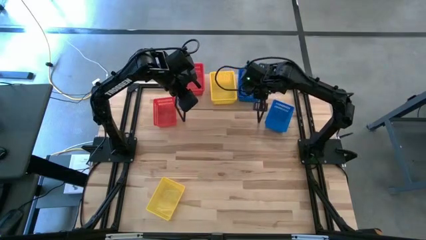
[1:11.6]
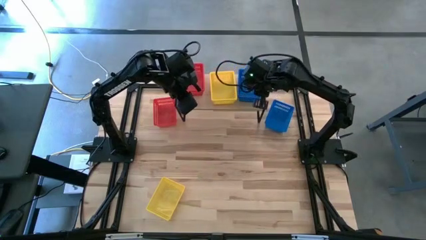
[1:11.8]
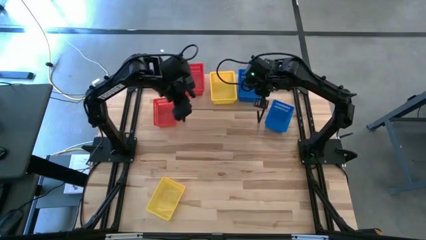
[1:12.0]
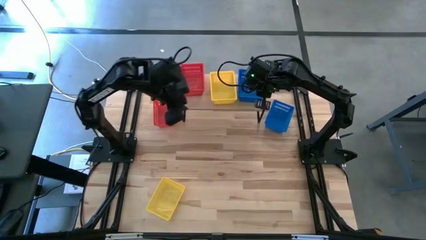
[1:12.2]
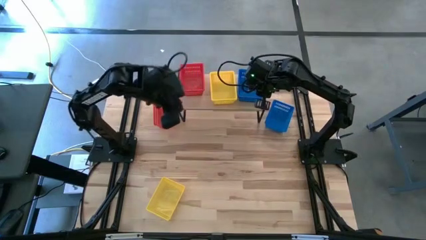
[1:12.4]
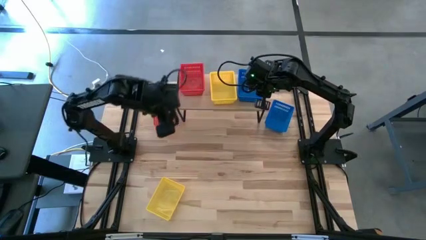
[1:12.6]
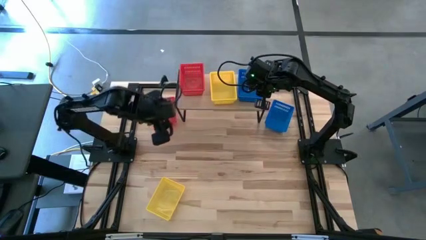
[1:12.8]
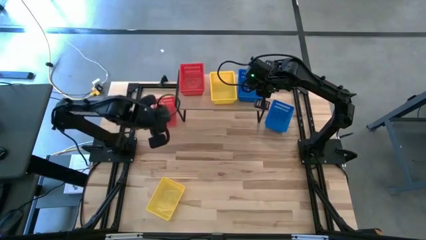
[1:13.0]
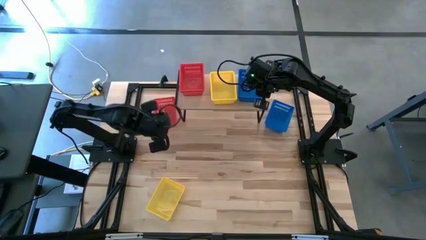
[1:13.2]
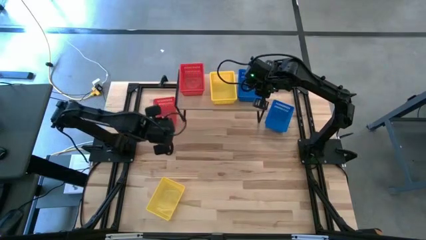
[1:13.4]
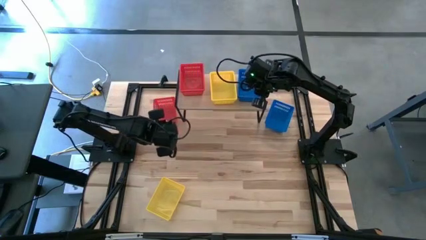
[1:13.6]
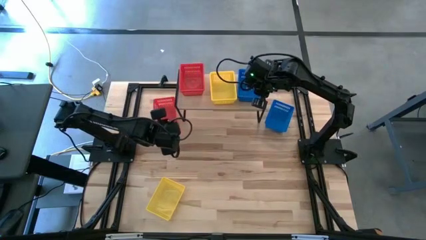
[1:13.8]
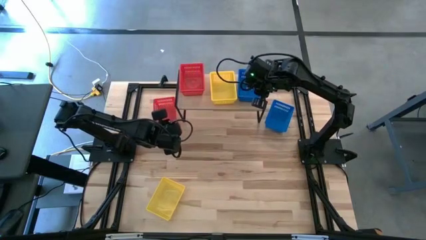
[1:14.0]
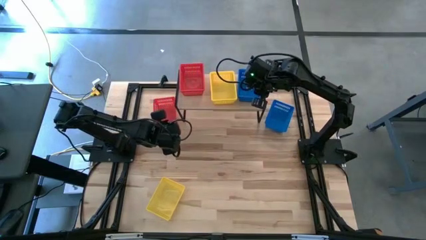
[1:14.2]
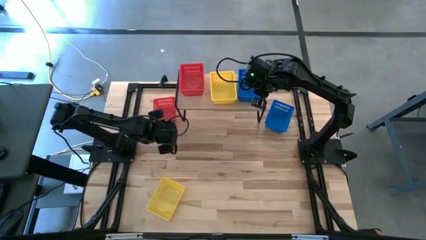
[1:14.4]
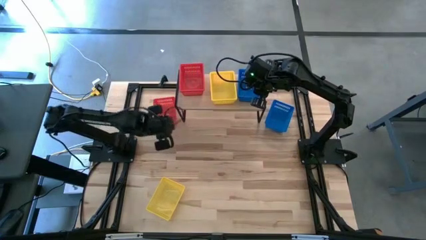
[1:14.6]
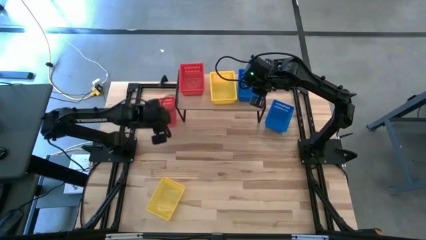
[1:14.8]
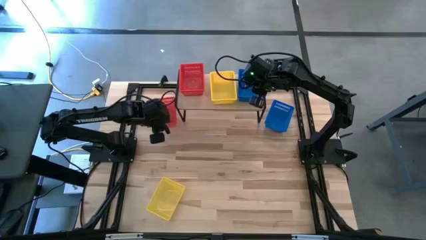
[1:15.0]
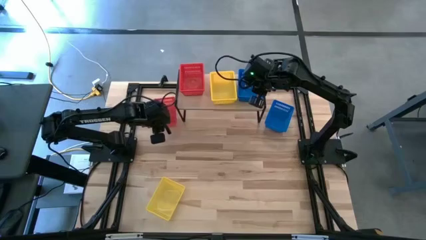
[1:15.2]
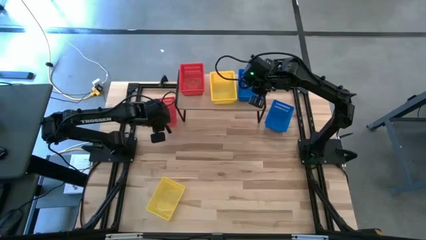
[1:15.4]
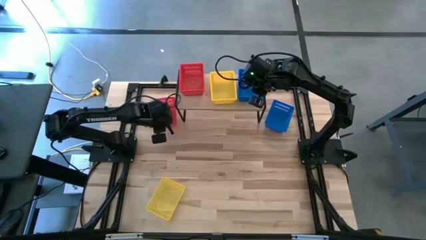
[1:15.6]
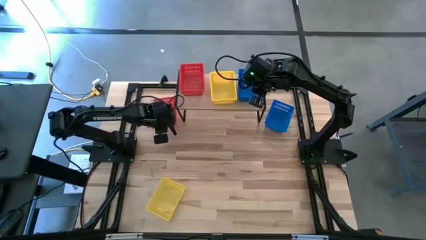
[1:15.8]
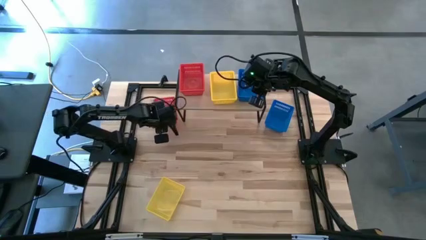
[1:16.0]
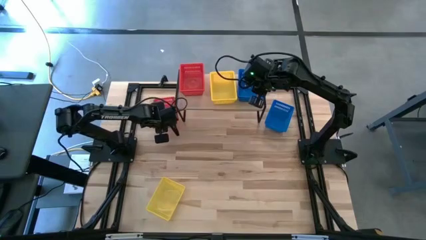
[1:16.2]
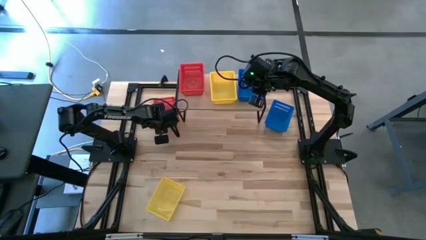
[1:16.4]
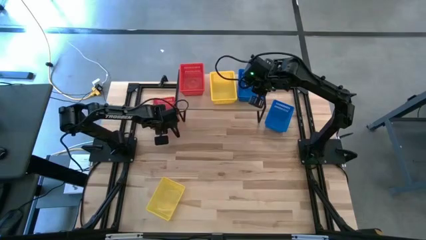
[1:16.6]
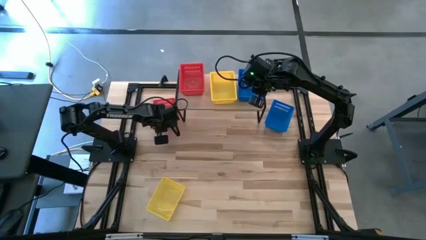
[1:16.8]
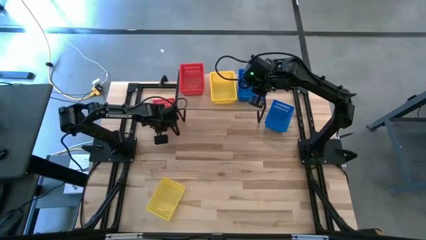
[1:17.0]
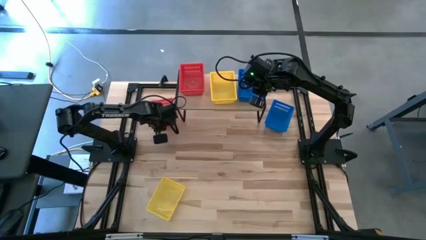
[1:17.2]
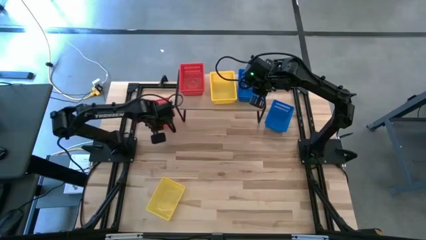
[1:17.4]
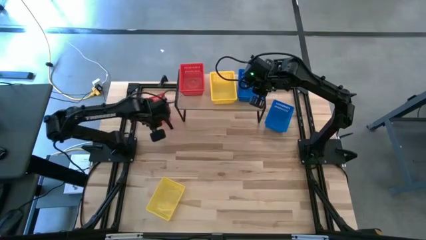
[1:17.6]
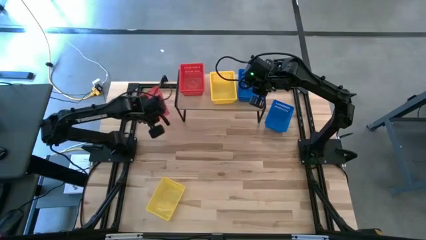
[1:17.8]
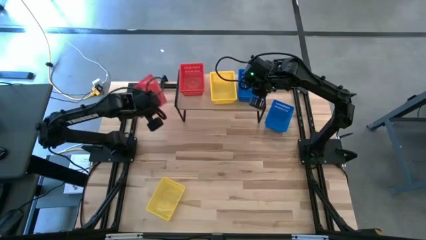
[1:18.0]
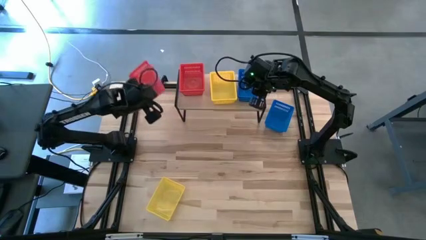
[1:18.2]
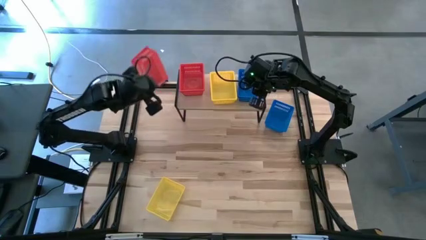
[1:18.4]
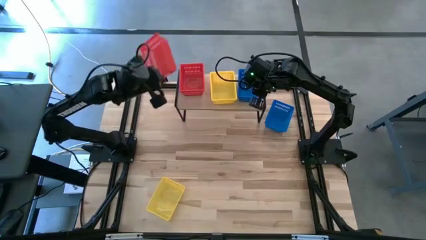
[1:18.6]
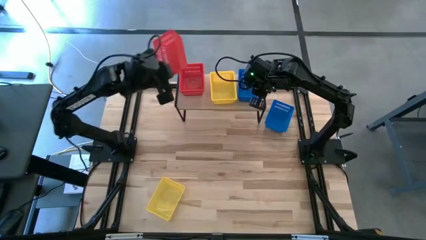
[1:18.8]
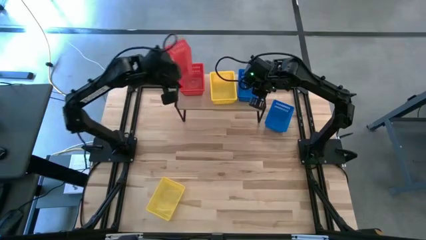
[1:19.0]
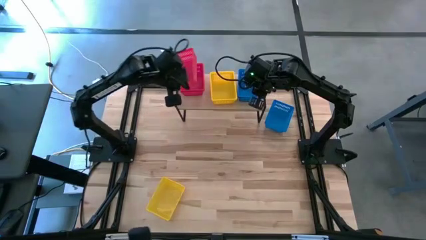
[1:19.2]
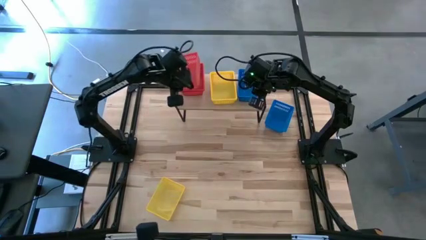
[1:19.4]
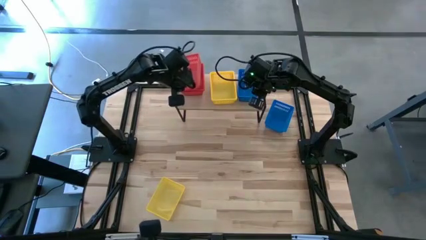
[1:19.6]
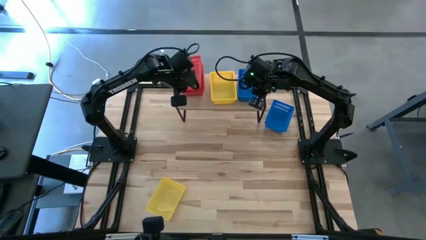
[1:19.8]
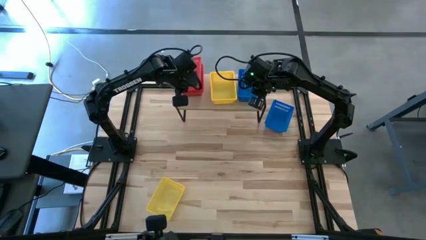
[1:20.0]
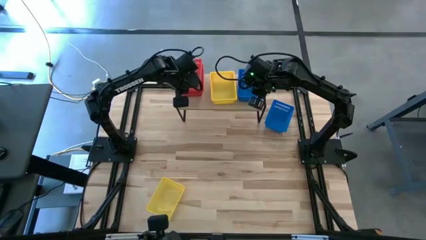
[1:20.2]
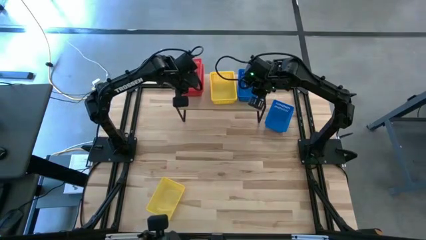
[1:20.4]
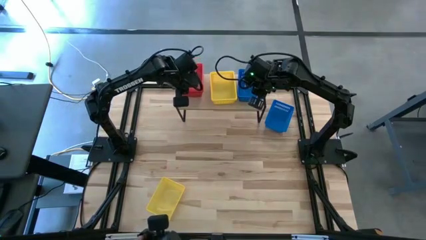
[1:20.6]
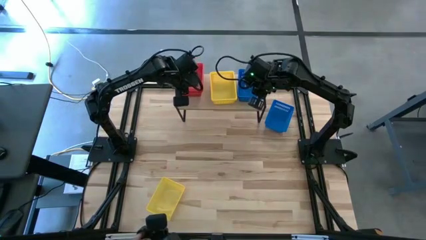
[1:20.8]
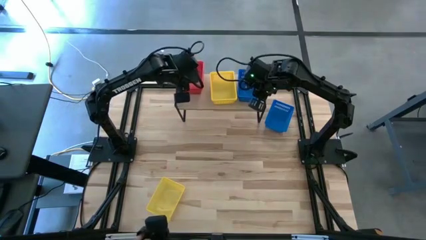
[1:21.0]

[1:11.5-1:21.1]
Task: Stack baskets on shelf by color
Stack the red bin on top of the red bins on the shelf
